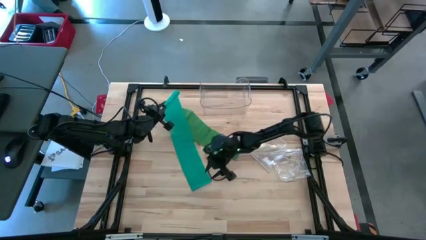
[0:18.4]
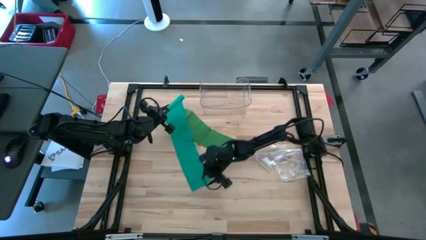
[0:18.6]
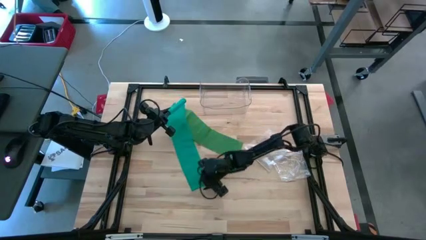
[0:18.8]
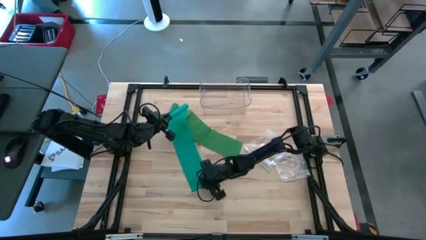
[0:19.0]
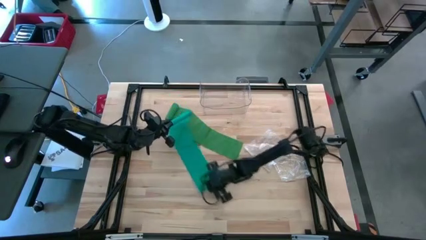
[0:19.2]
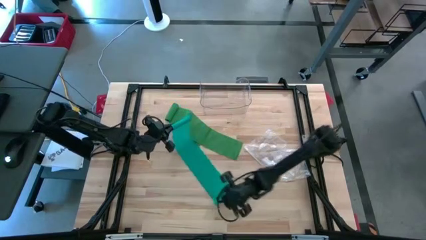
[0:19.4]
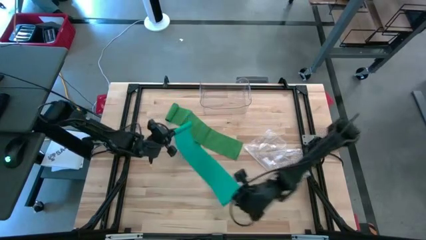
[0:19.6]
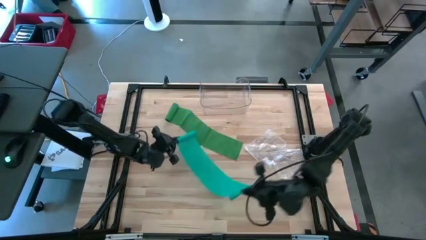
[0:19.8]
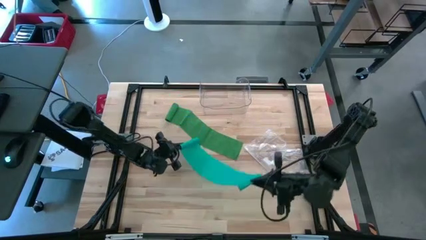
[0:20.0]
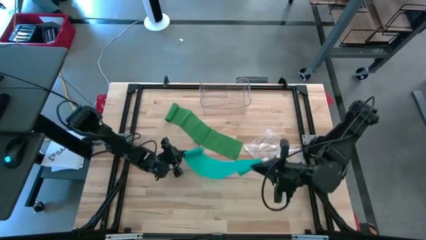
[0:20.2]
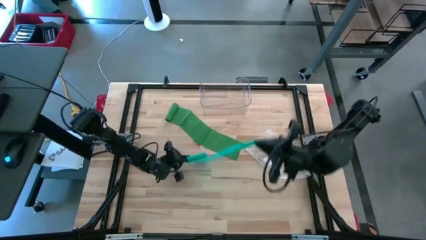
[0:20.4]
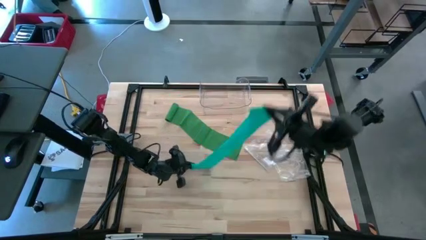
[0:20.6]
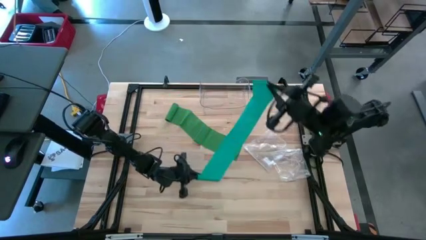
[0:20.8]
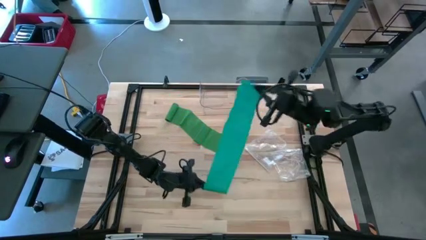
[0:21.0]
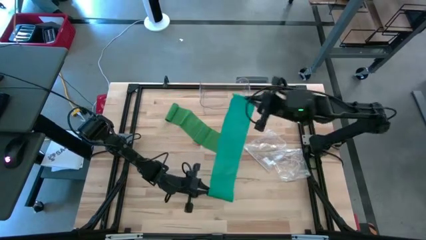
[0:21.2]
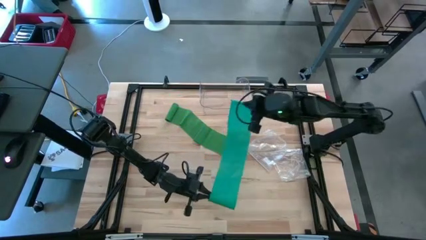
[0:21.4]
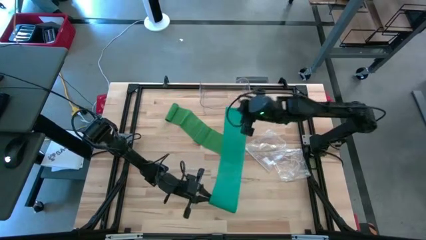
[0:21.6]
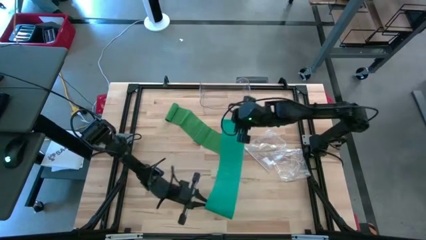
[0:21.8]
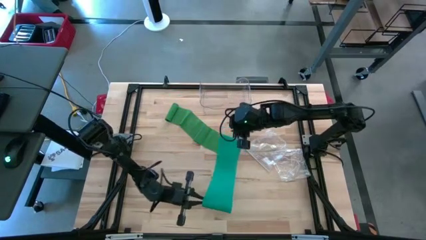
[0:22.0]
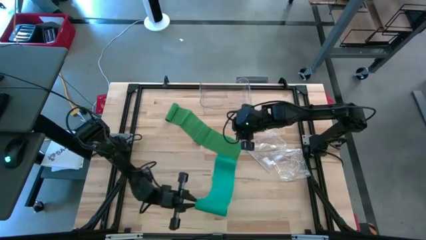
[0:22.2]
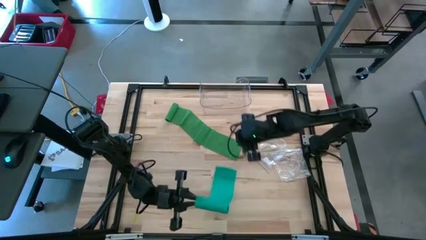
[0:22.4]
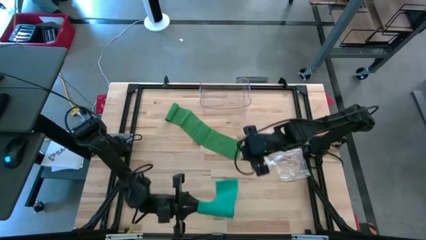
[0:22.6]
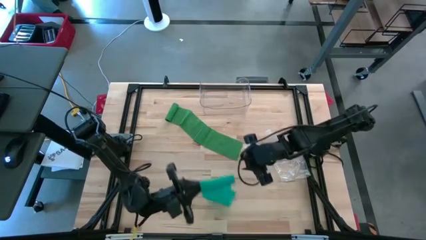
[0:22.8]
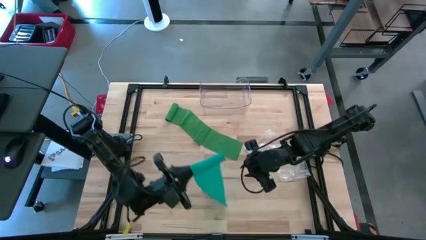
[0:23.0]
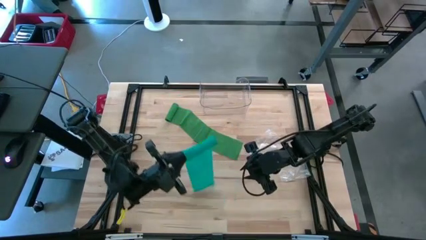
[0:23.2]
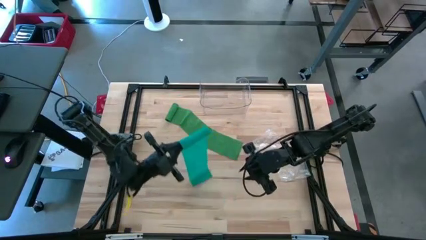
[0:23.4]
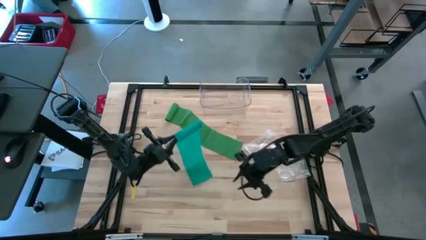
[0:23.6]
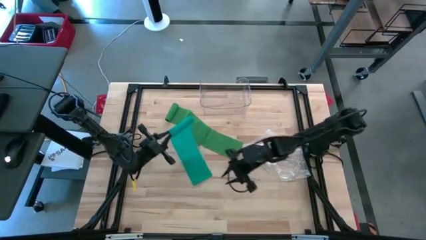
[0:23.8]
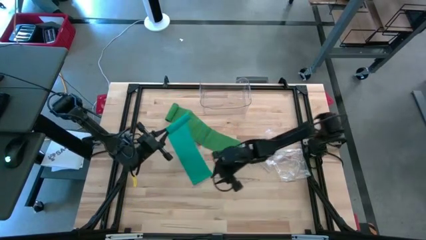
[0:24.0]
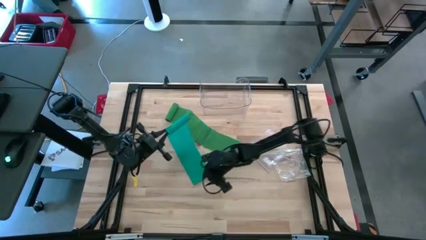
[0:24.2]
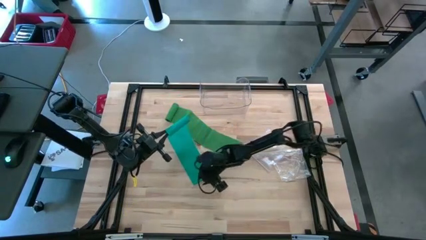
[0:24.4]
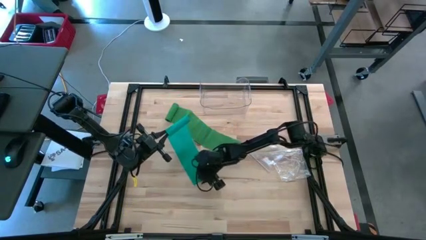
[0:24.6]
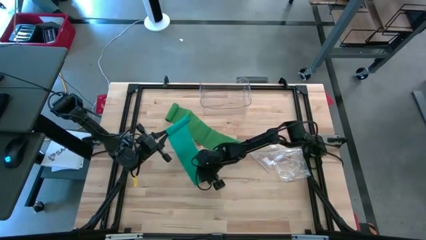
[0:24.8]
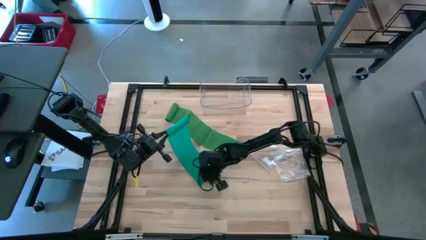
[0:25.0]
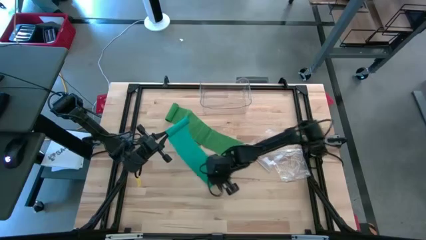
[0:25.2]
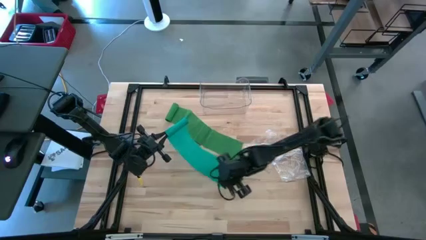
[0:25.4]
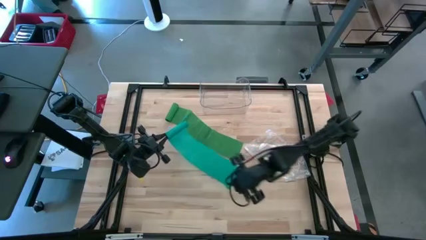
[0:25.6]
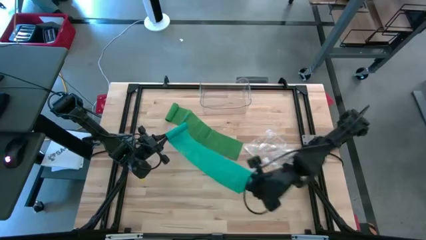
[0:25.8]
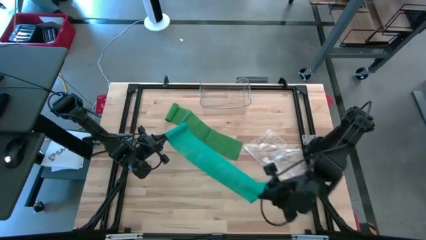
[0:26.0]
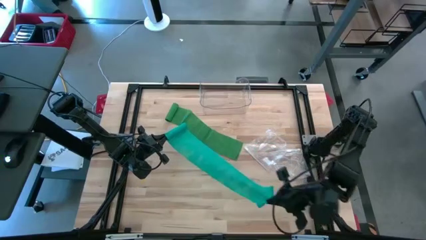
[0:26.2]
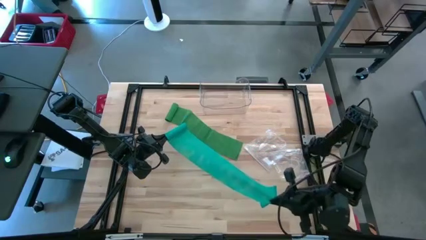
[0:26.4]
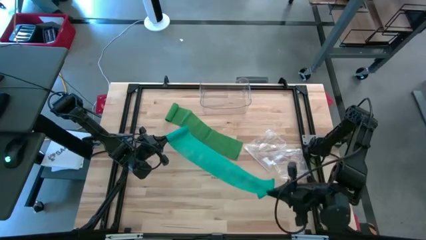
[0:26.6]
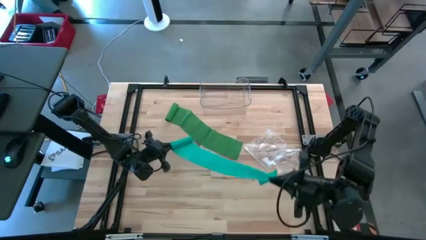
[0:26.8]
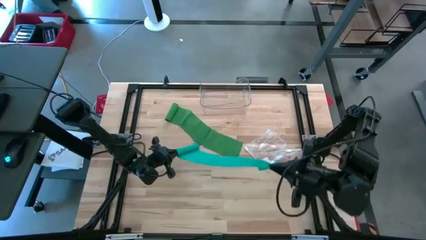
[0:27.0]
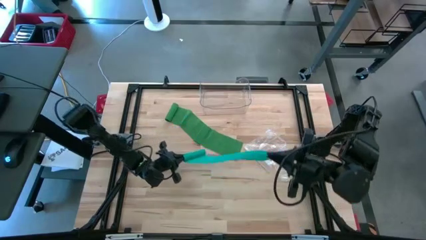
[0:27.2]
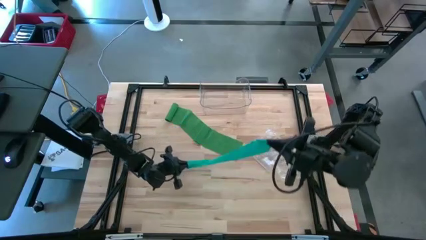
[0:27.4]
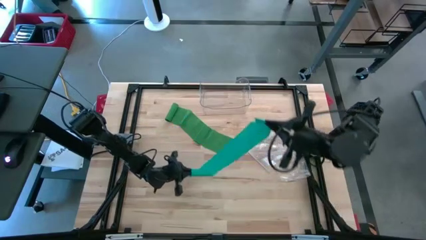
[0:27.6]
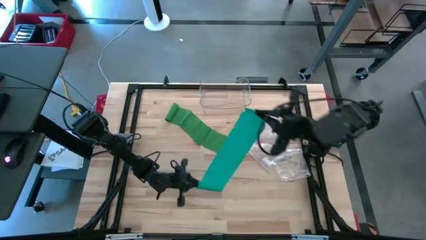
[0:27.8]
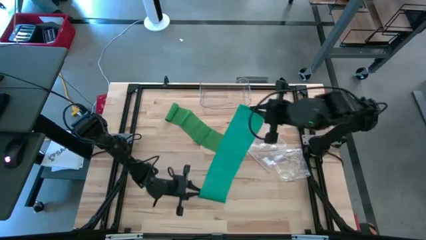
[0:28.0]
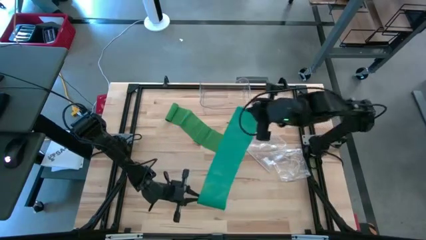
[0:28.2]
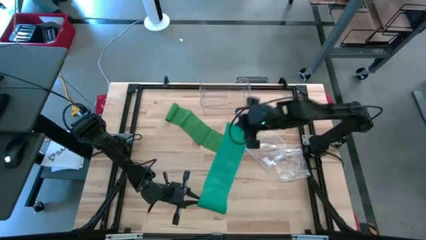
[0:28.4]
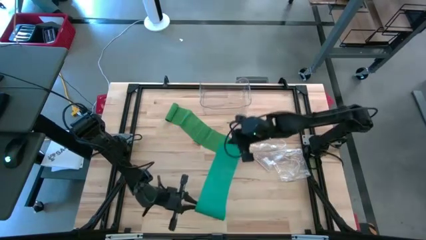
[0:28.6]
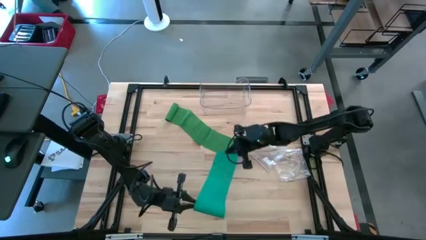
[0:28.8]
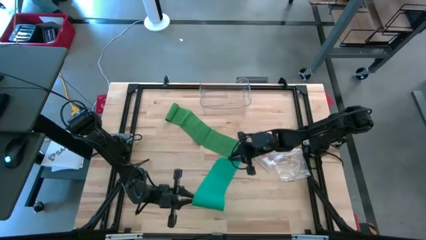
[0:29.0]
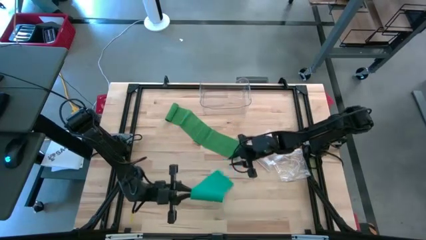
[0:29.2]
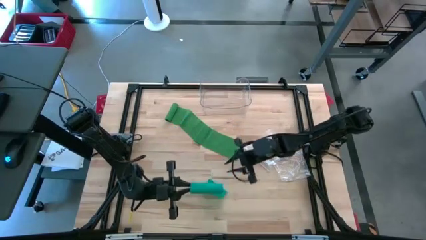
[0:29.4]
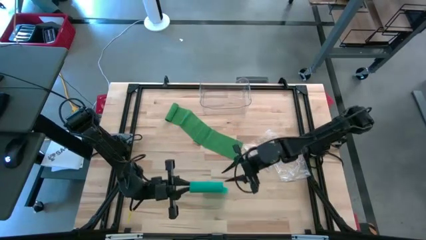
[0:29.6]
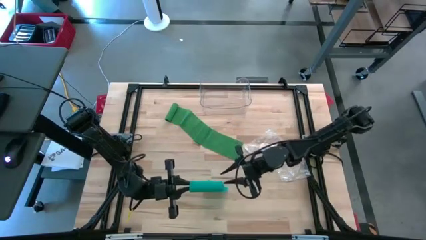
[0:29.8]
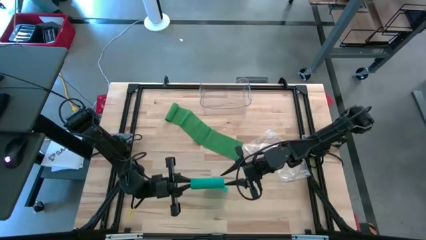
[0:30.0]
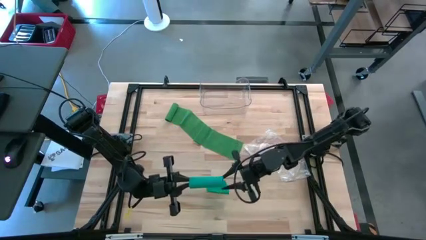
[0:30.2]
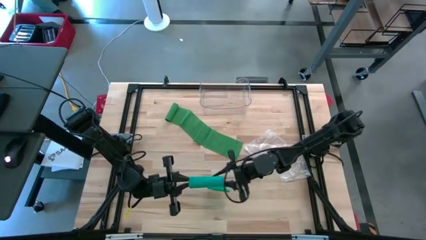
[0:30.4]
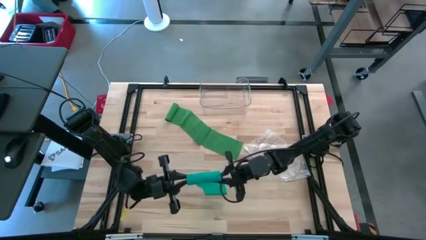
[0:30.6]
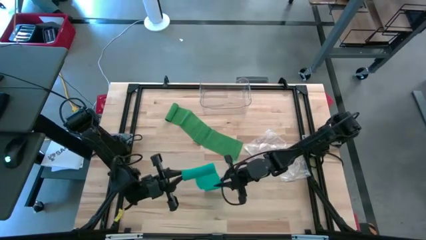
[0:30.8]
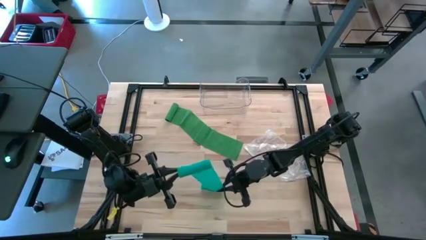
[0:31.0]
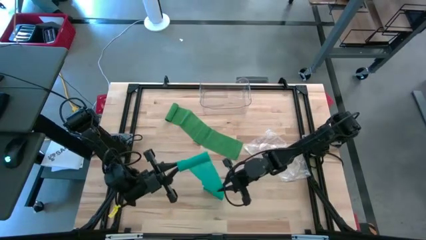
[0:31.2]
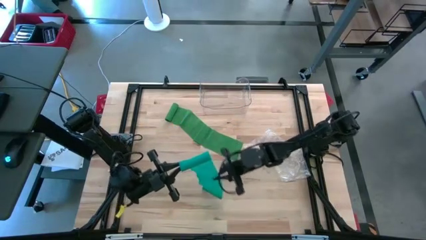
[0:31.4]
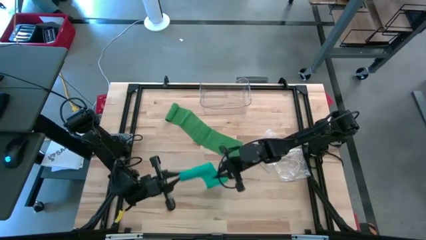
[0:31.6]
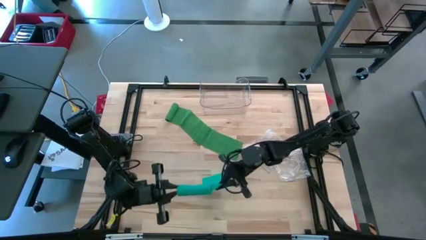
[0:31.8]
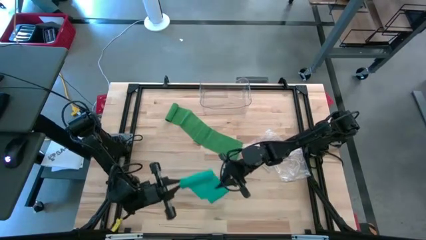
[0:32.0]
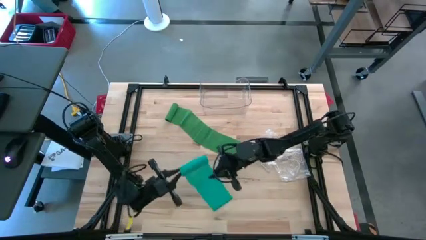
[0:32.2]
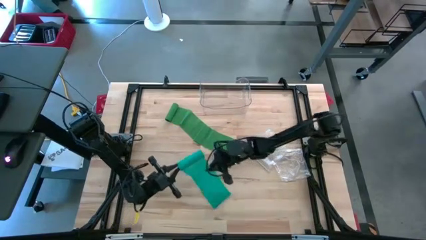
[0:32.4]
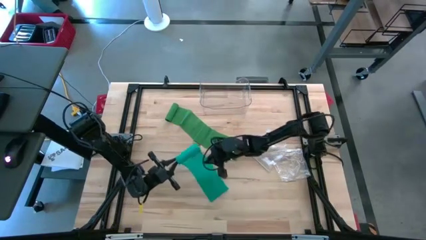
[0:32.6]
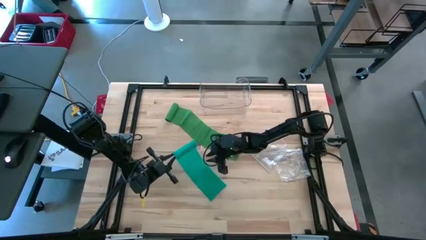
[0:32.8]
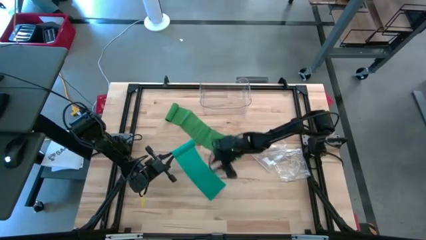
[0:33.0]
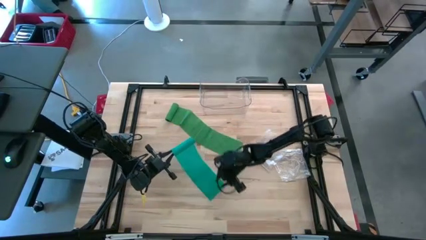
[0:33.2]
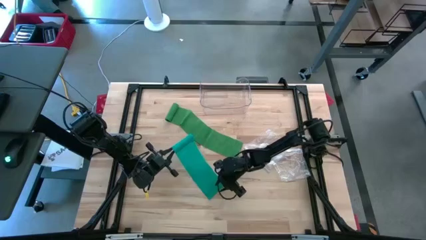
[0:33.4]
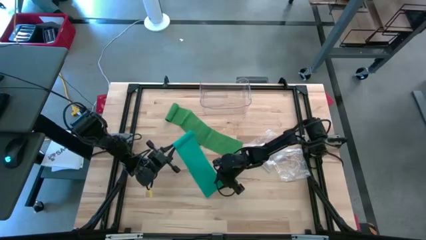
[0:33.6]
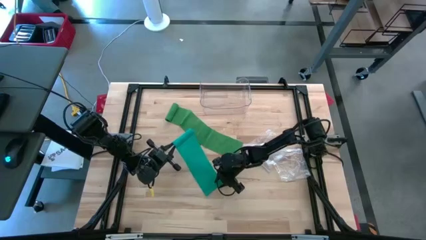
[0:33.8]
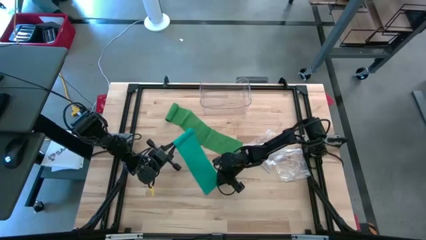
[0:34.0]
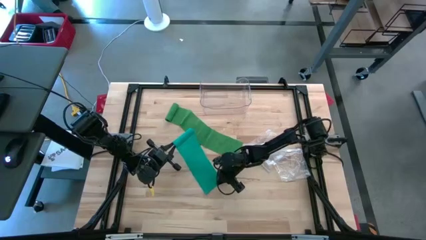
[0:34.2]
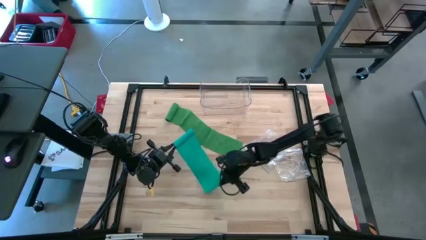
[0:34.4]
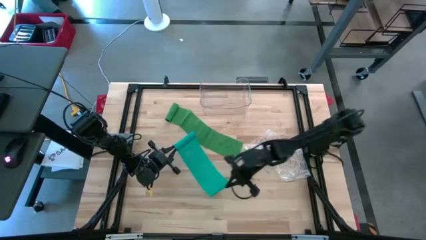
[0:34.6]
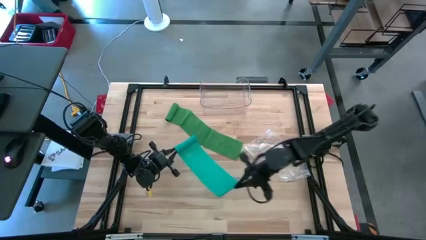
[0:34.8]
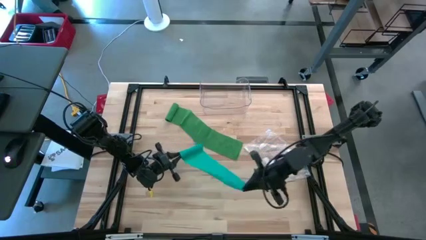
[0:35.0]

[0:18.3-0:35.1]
Task: Roll bandage
Roll the blue bandage
